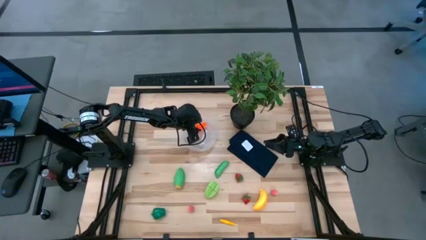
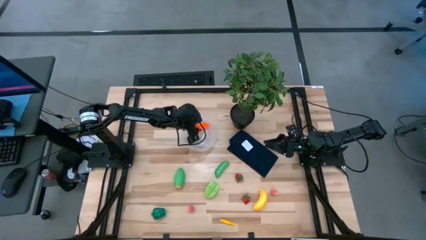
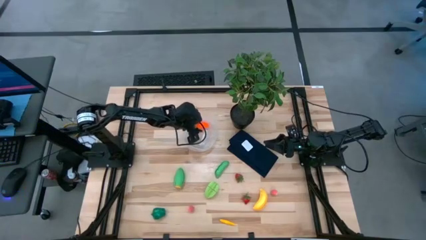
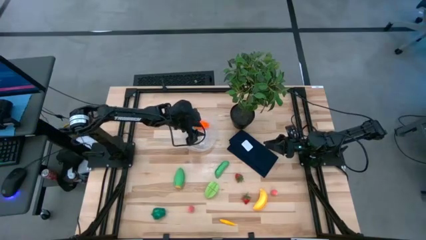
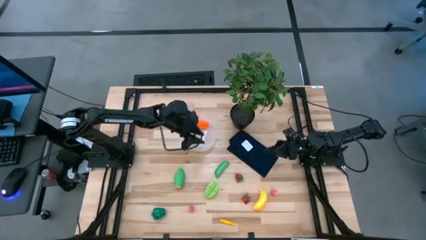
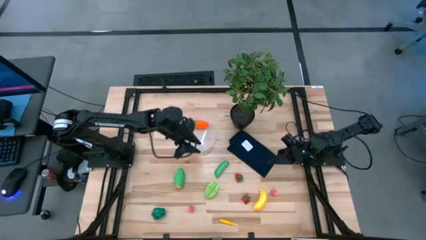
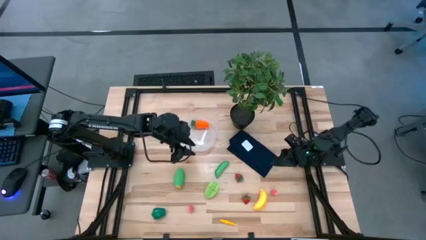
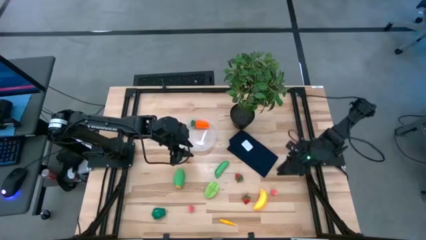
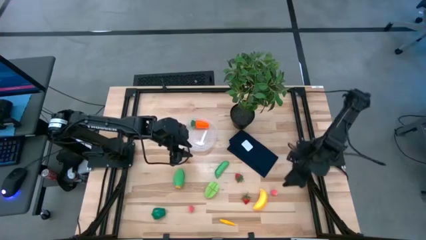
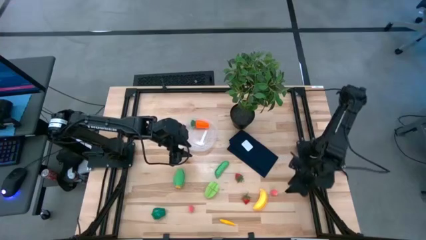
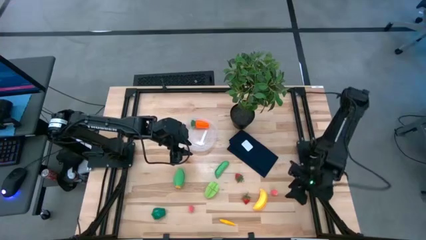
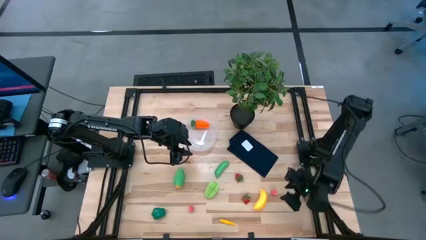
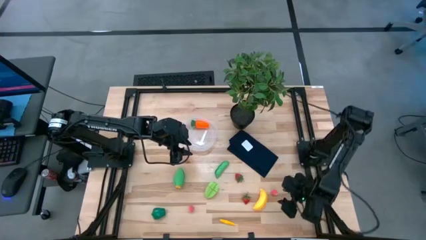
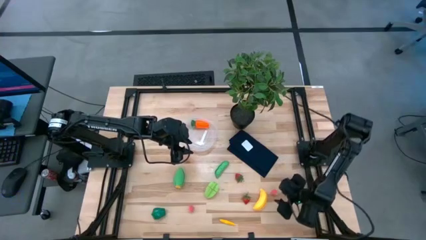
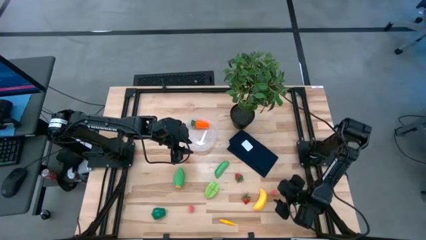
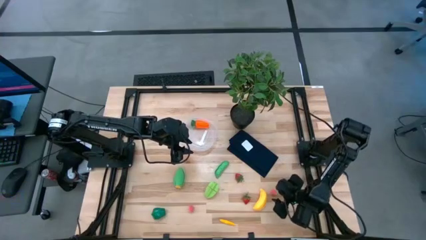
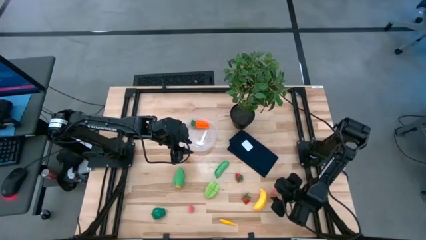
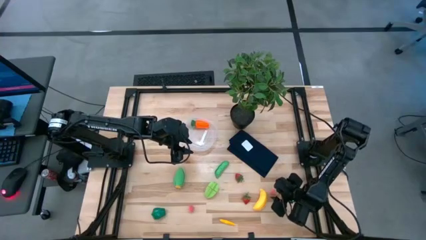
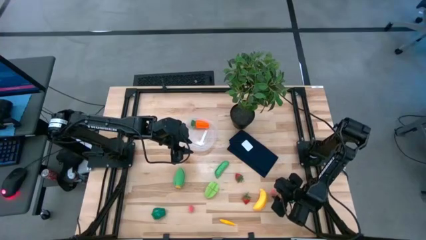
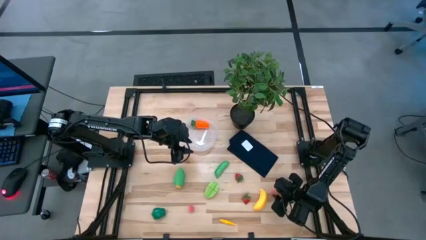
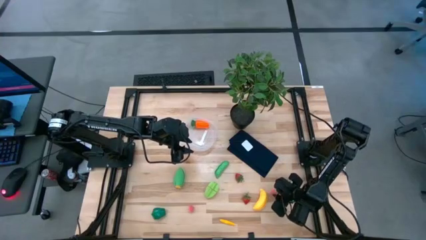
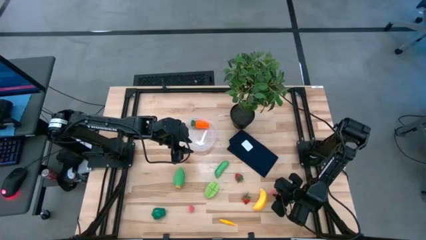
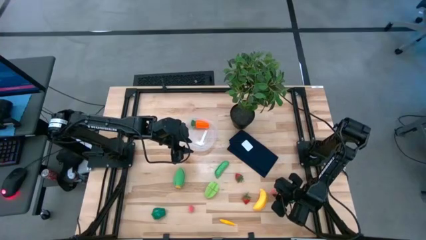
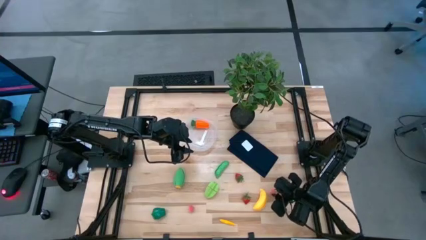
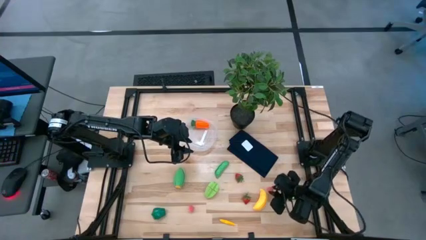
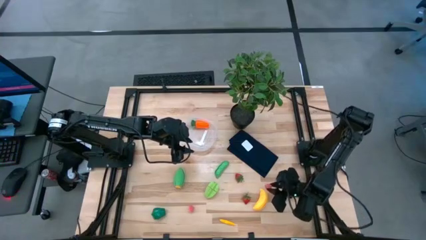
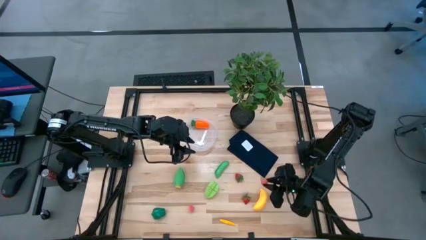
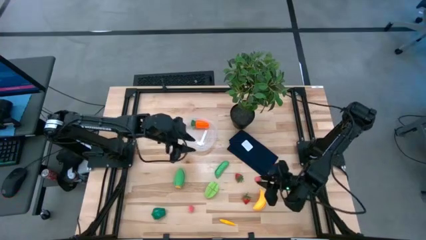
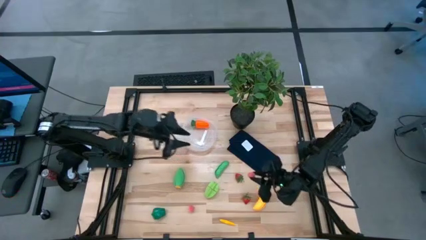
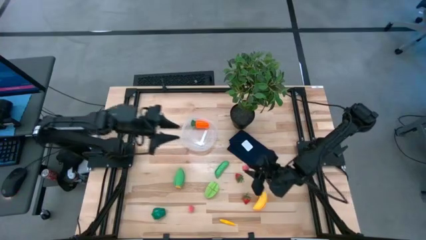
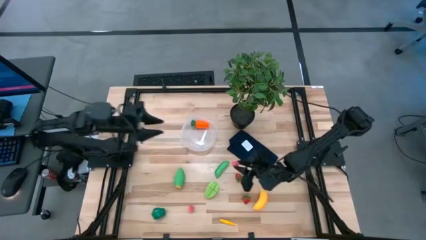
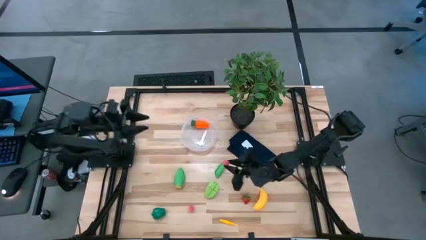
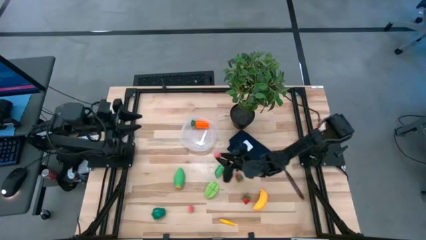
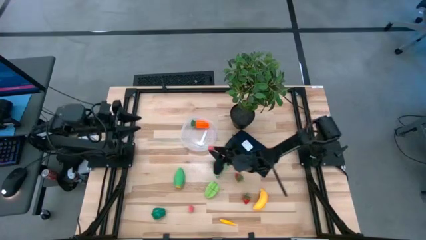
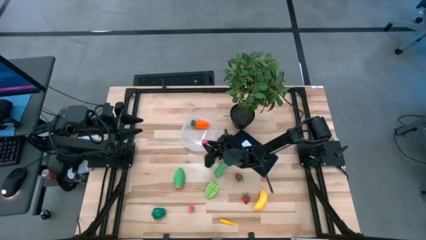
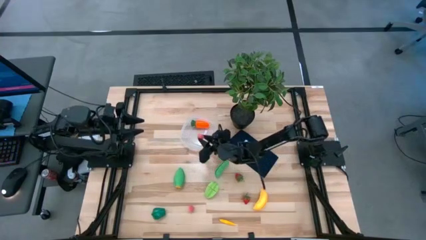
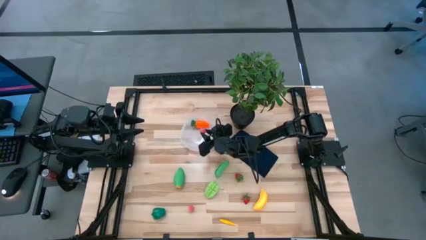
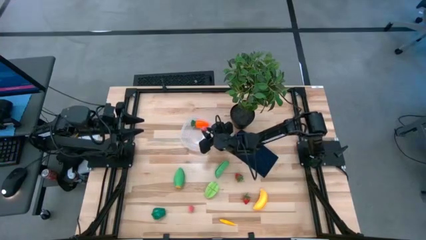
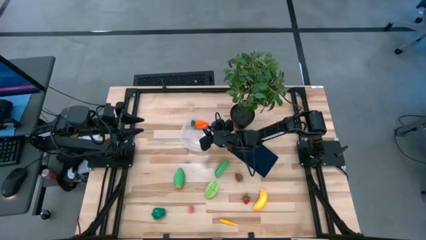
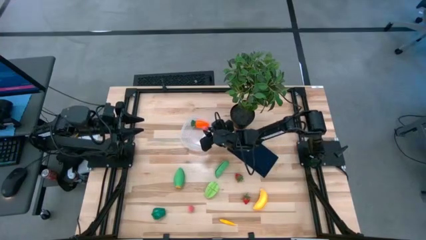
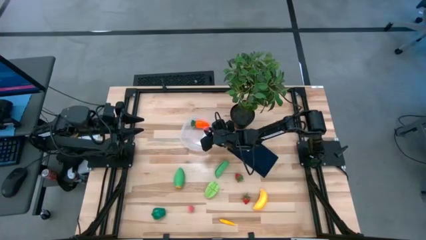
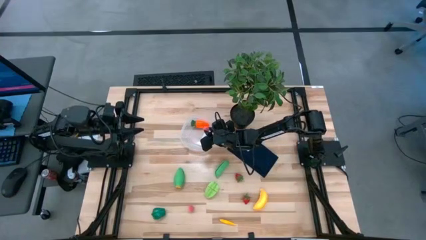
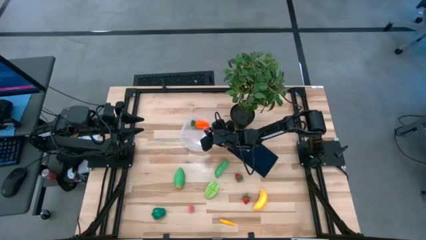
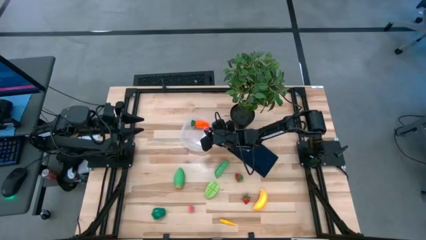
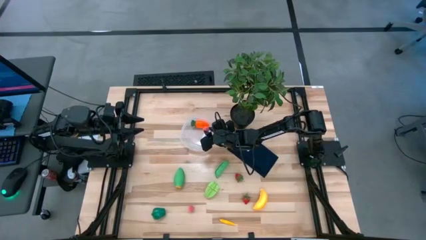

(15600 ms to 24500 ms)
Task: Pick and placing Produce into tupperware
Put the right pink peach into the transparent bin

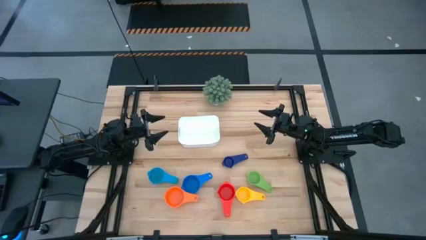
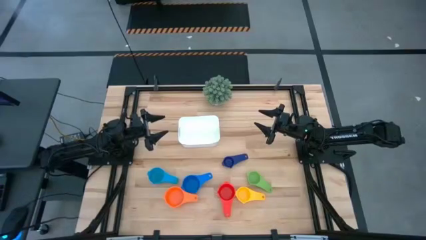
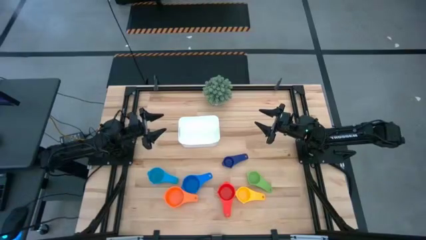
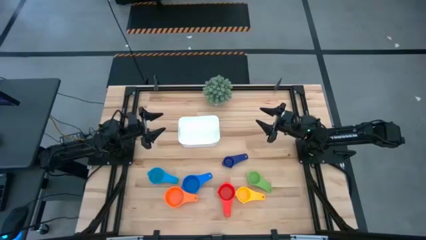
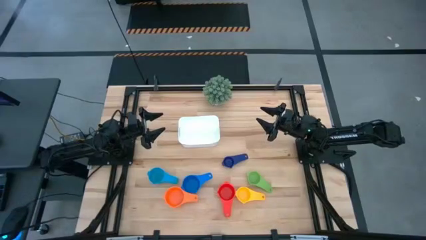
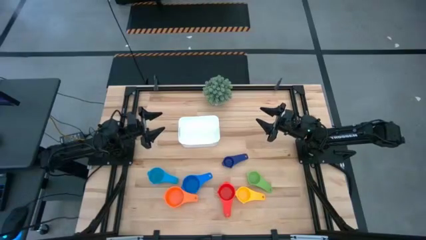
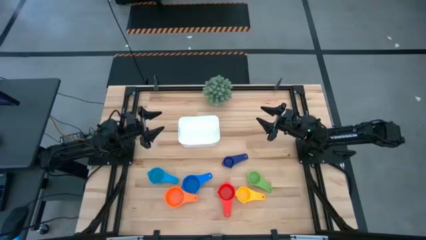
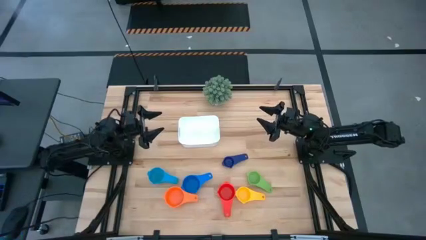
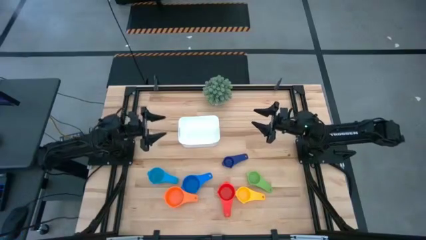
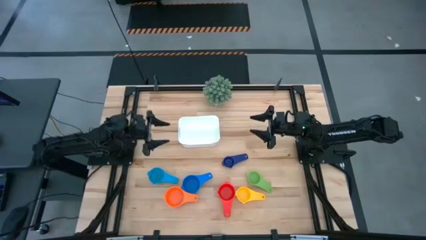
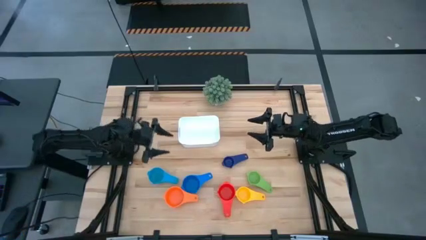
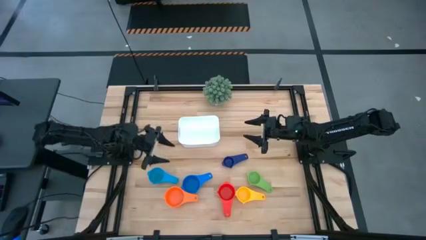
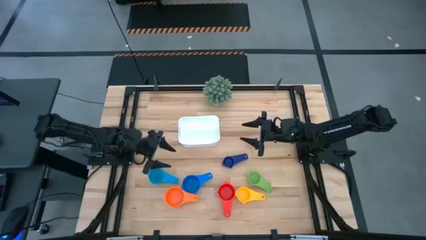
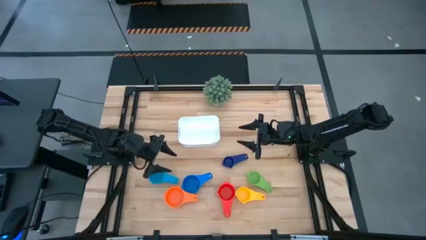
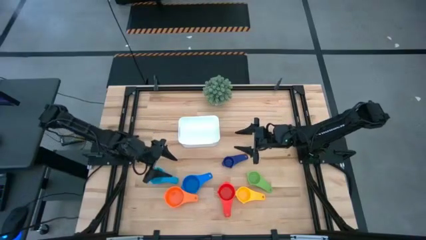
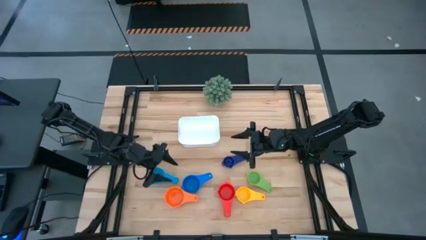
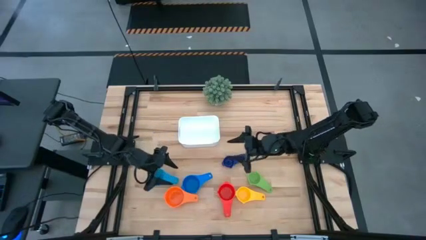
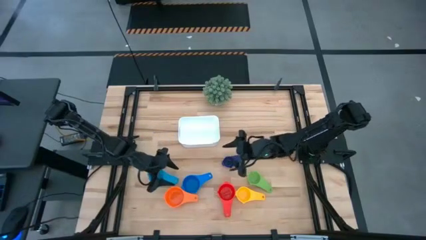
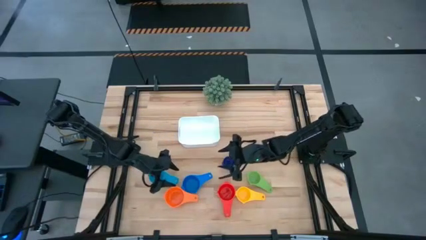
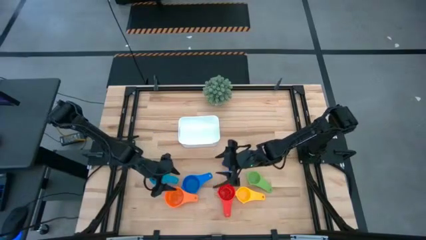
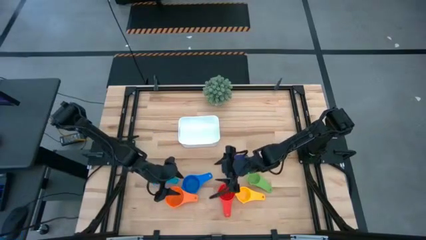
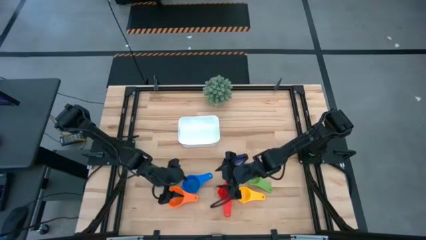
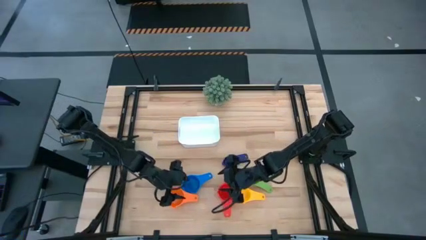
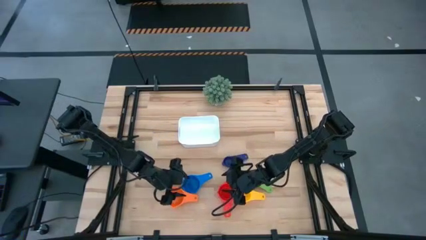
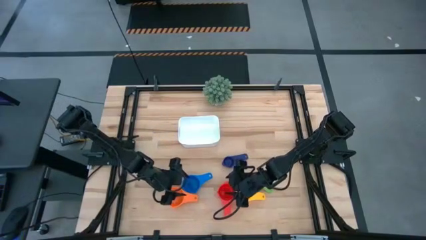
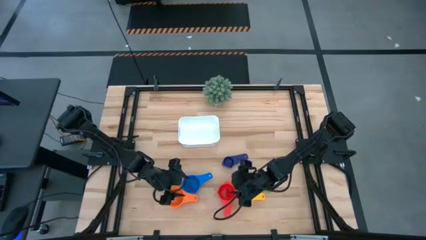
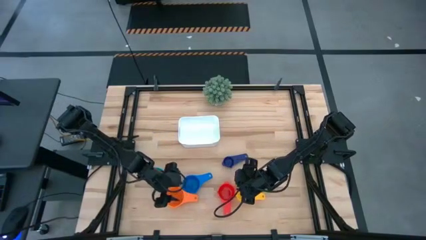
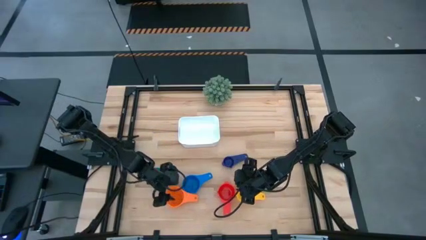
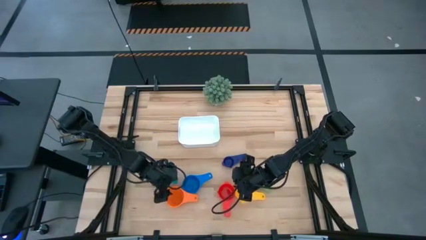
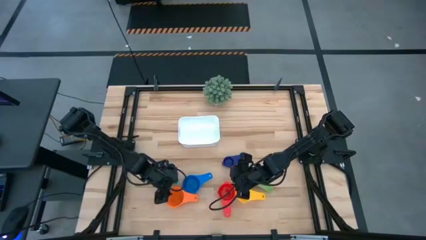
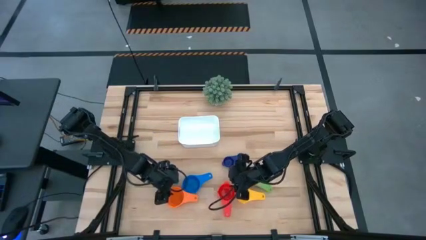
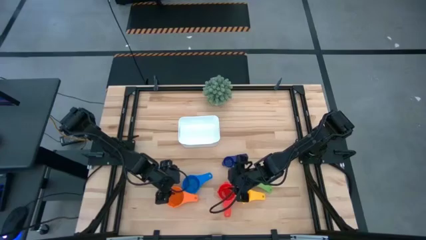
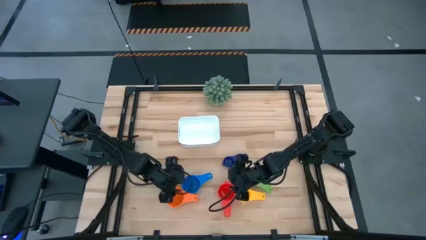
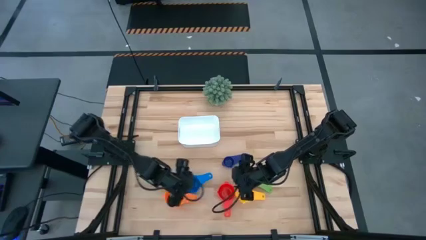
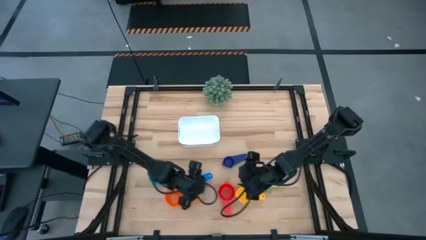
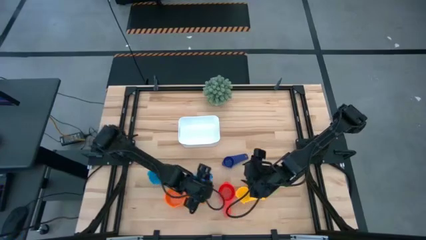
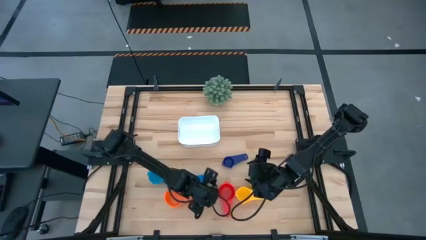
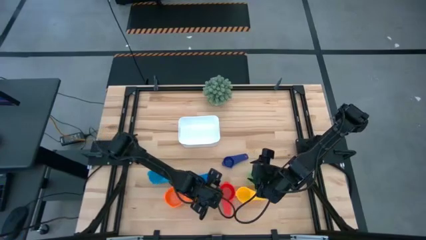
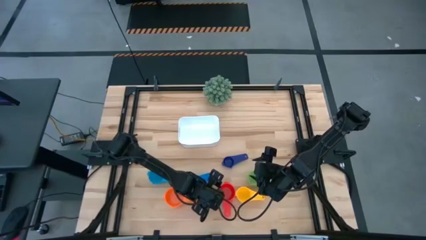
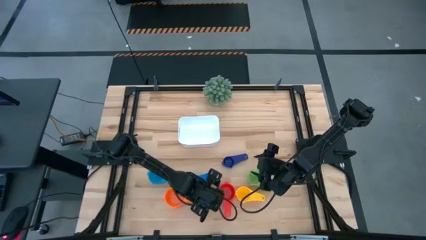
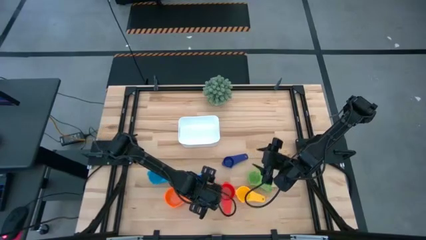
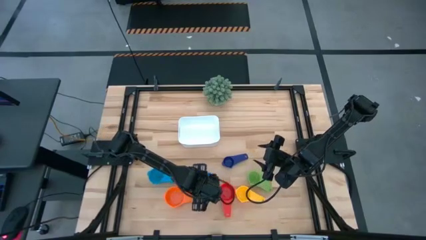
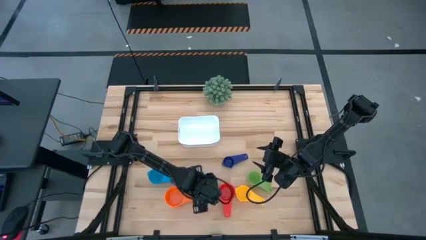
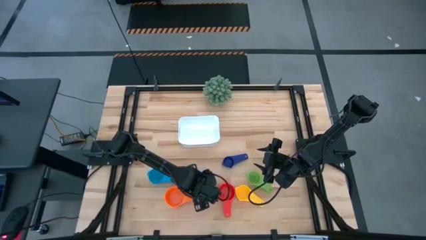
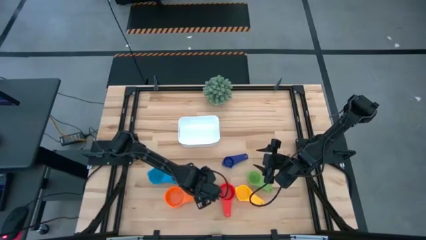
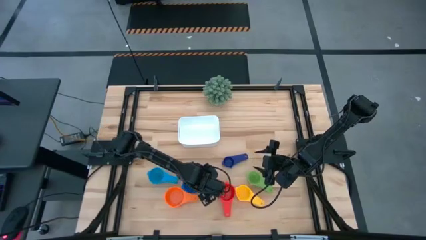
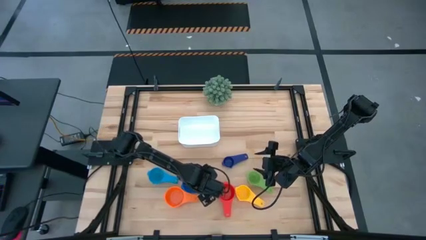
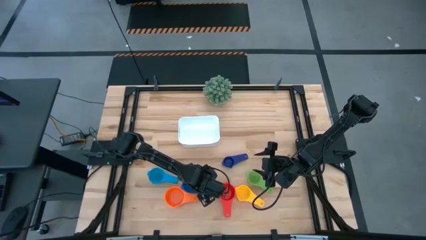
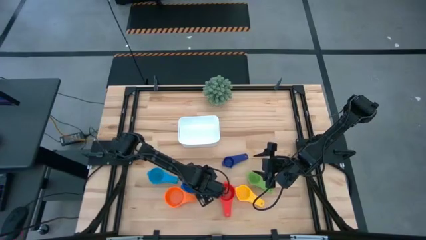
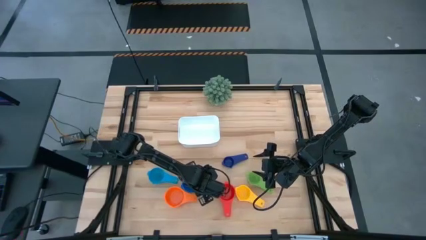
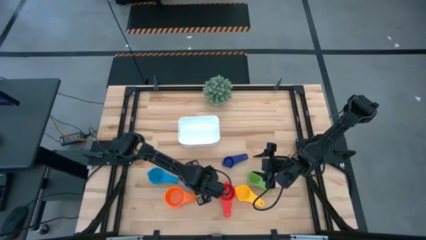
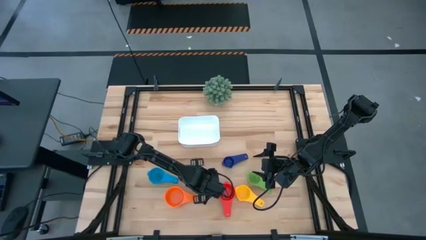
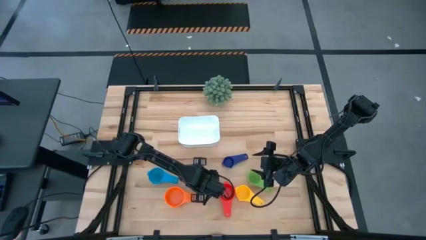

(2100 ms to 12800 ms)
Task: Nest measuring cups in basket
Stack the large blue measuring cup on the top orange measuring cup
